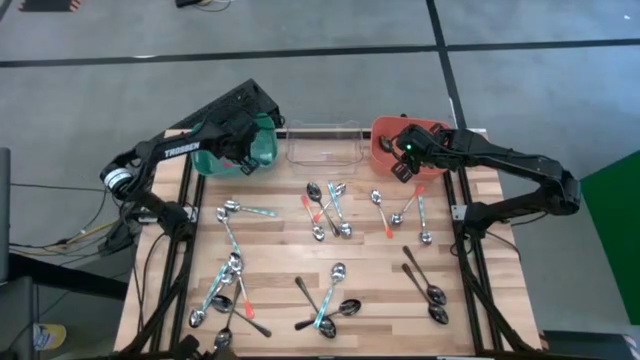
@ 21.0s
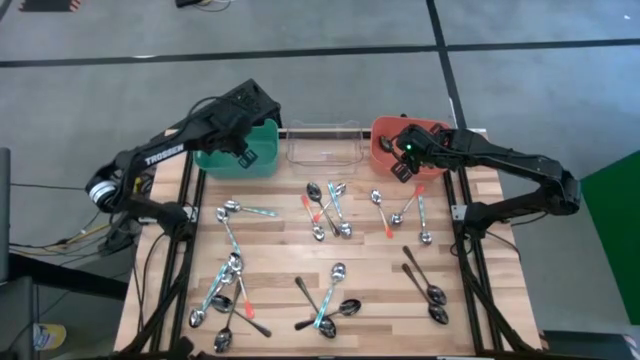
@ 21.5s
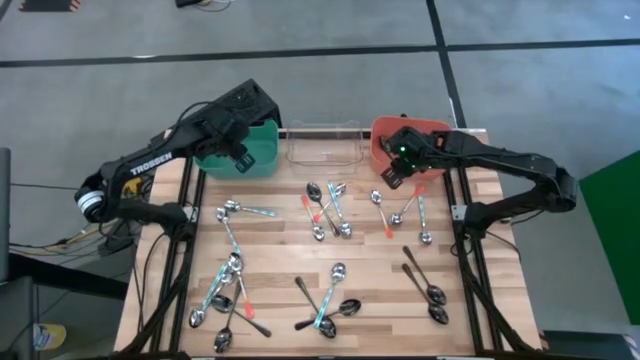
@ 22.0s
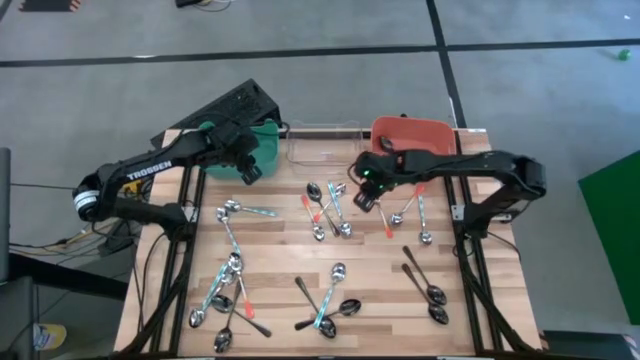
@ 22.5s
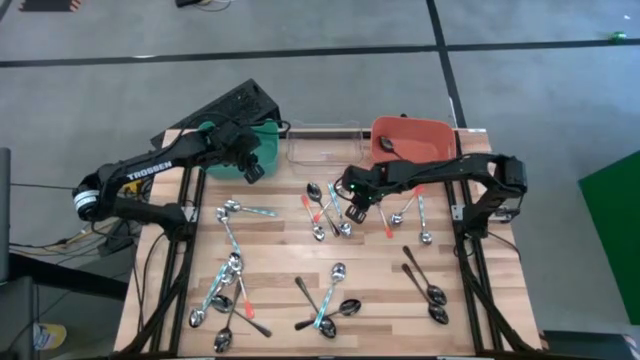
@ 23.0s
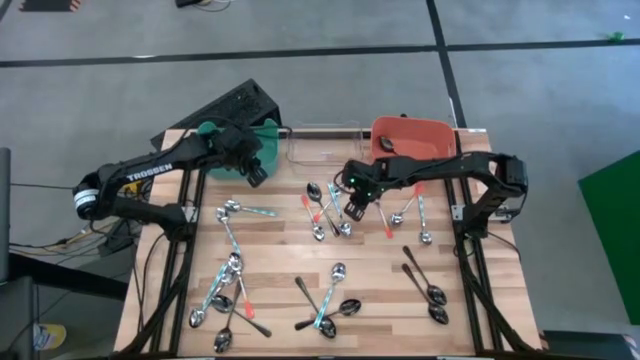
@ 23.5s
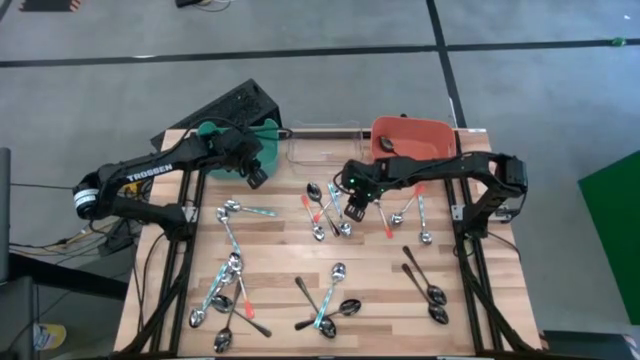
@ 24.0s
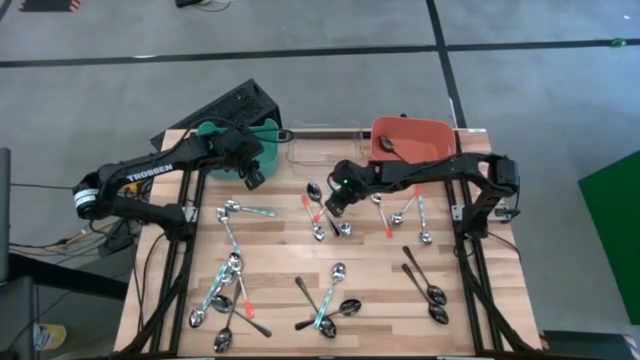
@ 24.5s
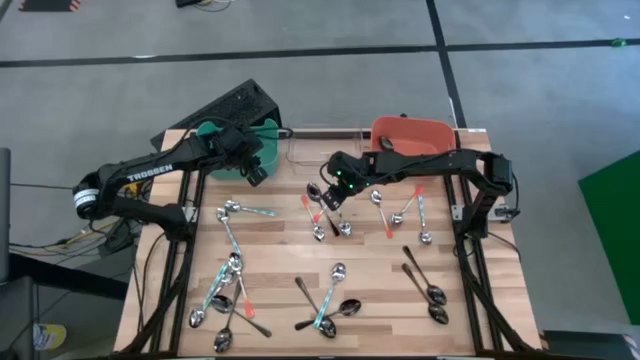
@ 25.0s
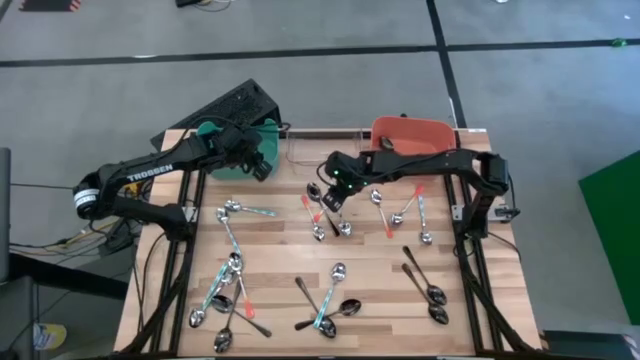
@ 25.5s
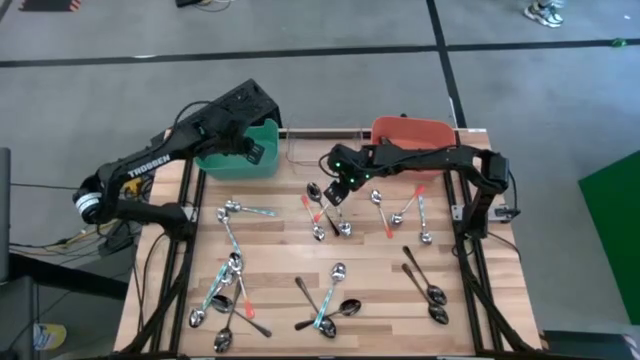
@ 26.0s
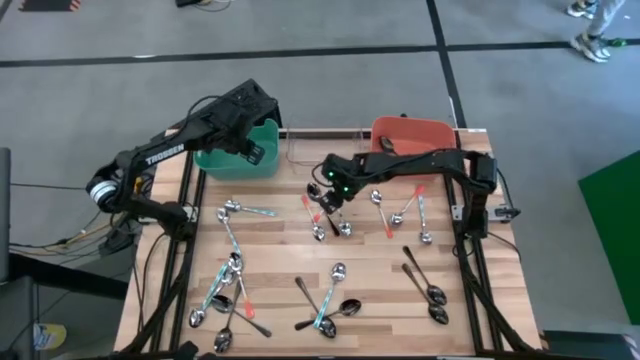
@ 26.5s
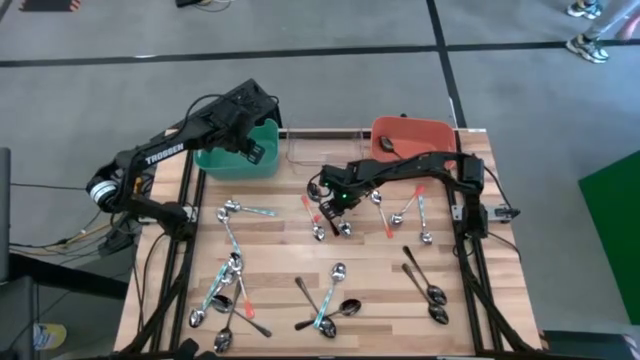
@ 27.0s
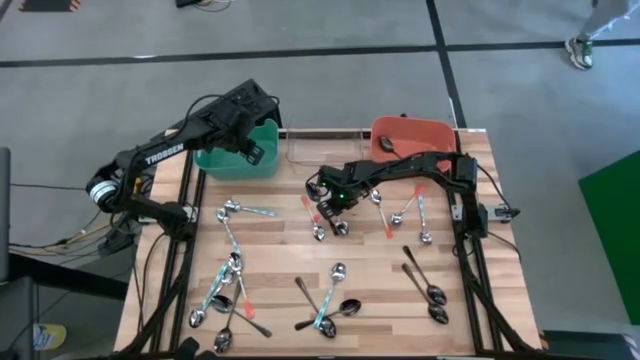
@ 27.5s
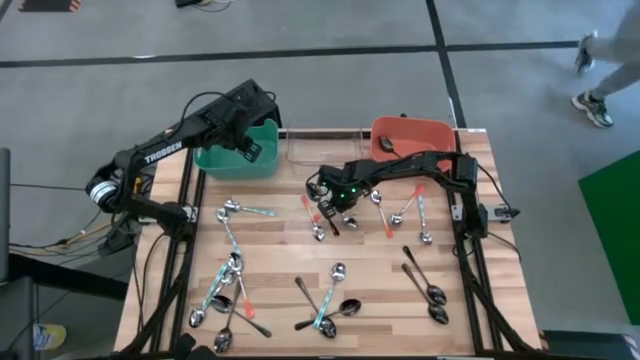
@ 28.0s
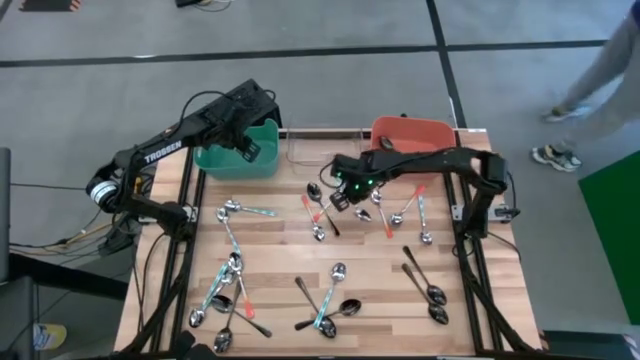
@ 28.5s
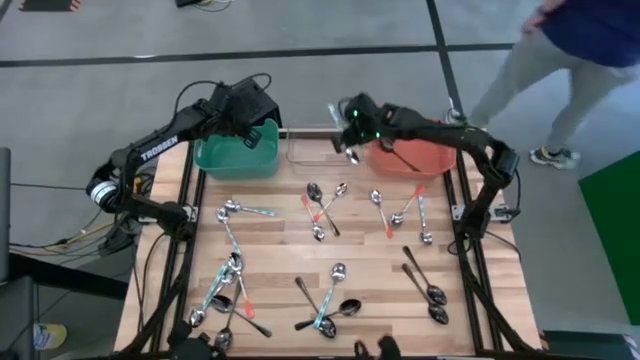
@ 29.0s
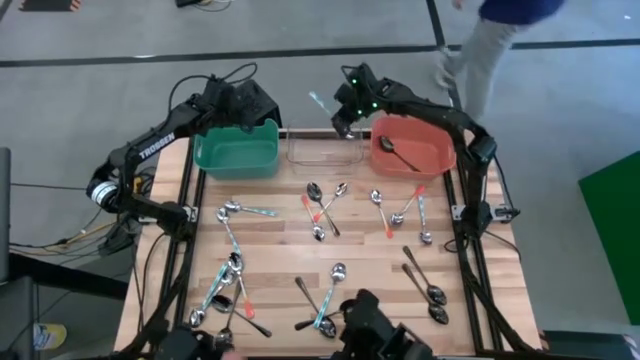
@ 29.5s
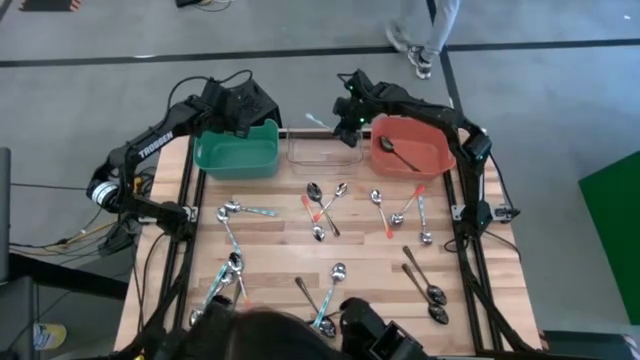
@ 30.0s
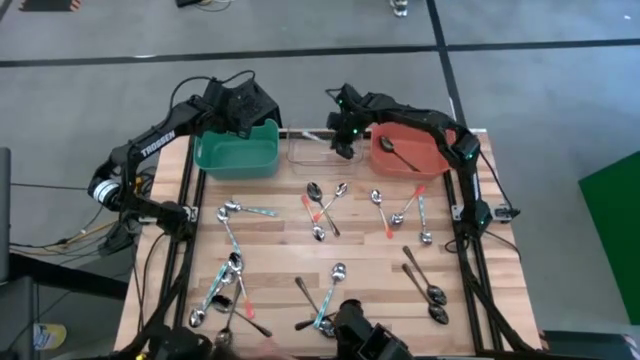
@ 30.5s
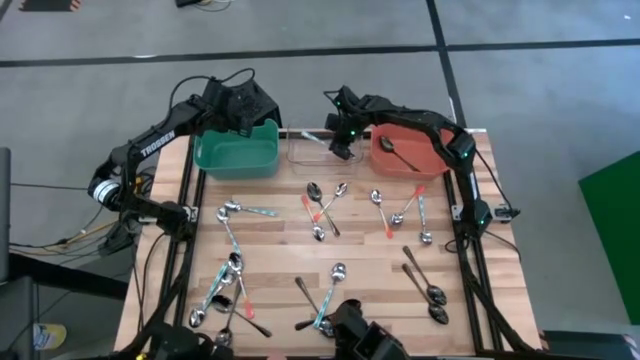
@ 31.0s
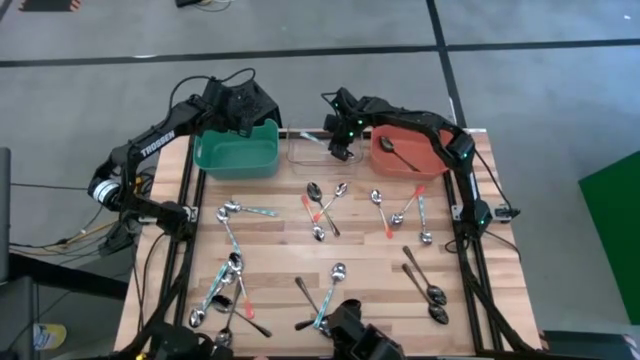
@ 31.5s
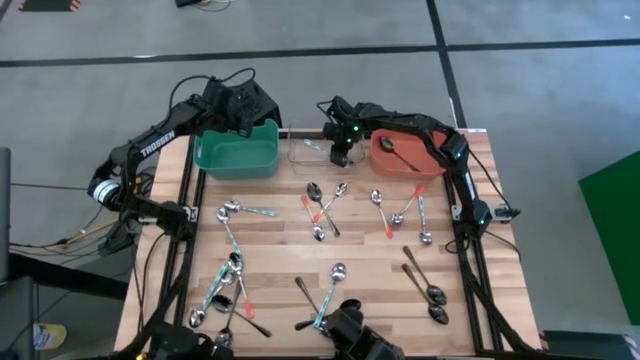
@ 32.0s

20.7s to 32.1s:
Task: Sort silverware by color (type)
Put the blue spoon into the transparent bin

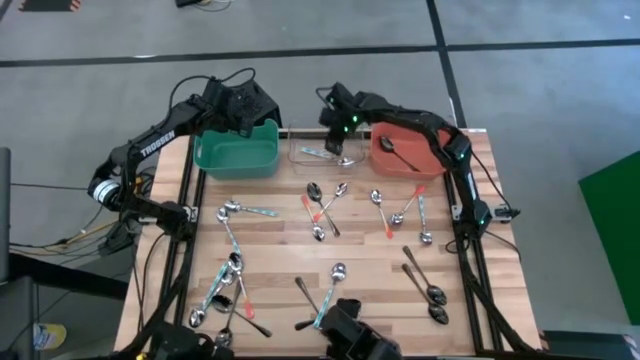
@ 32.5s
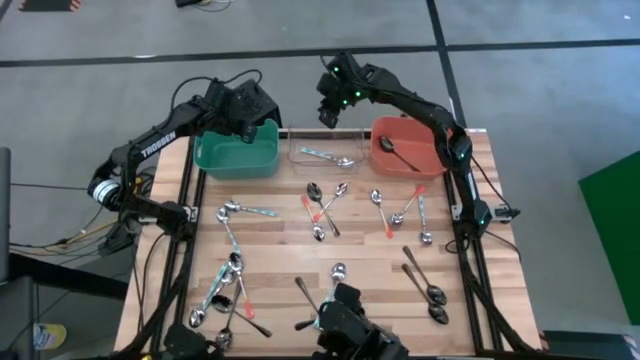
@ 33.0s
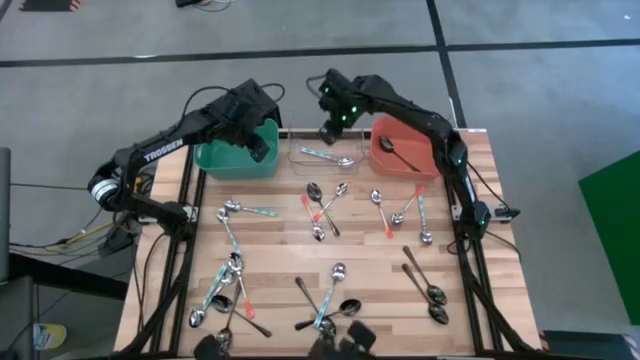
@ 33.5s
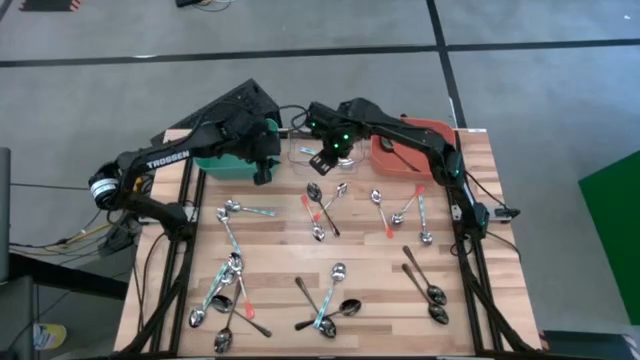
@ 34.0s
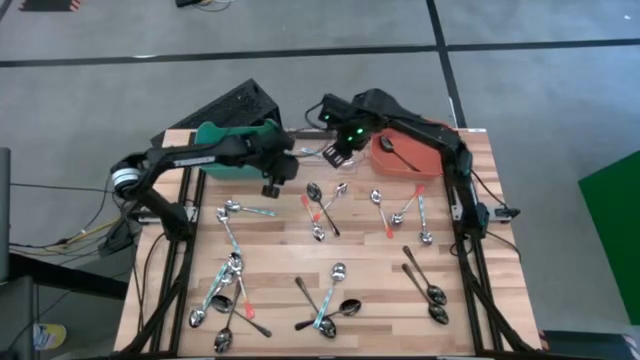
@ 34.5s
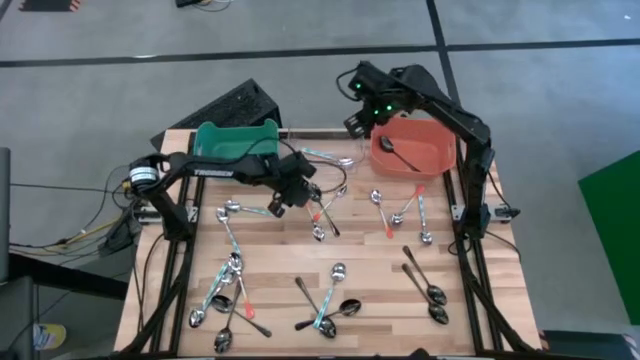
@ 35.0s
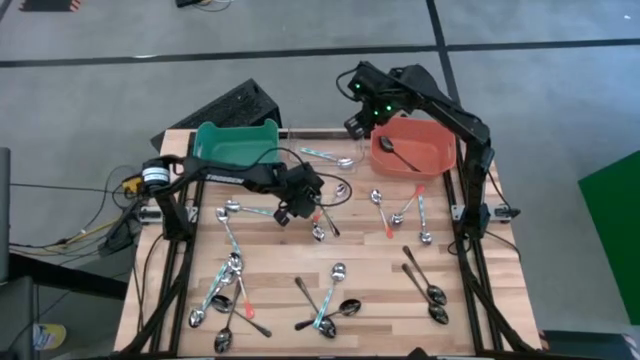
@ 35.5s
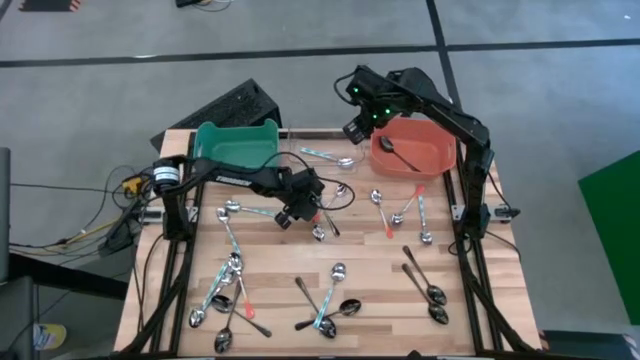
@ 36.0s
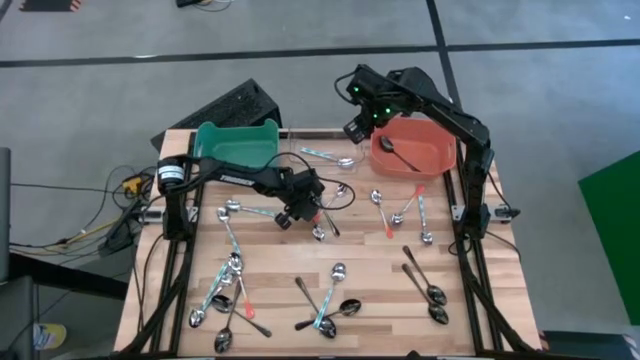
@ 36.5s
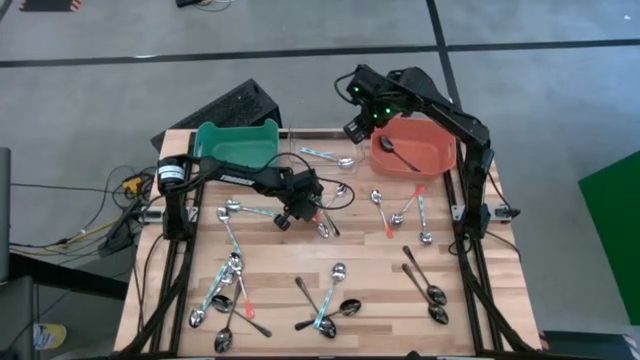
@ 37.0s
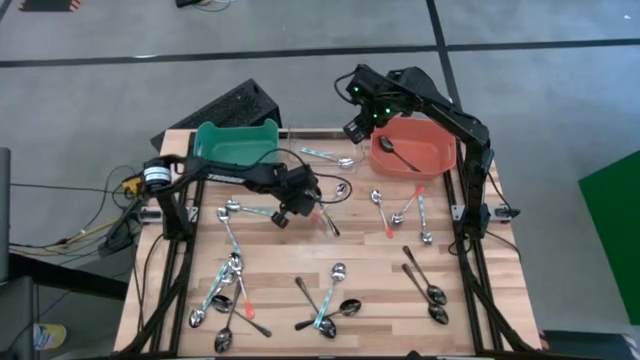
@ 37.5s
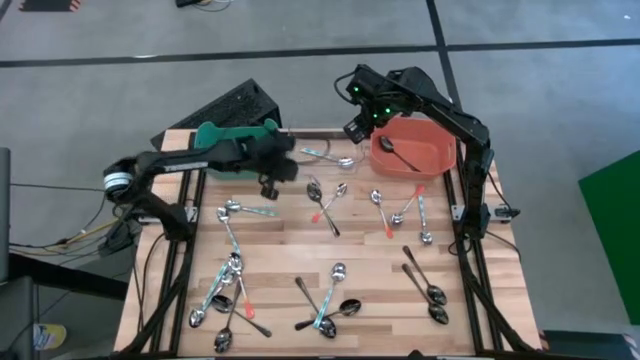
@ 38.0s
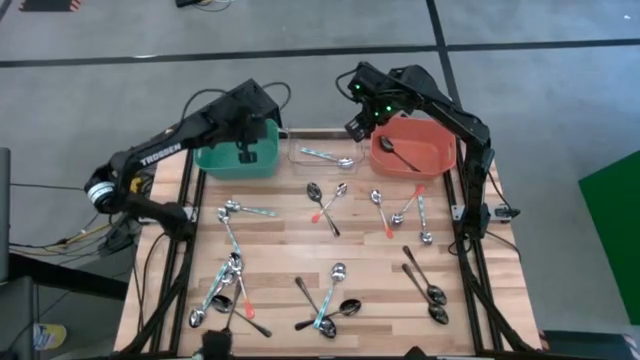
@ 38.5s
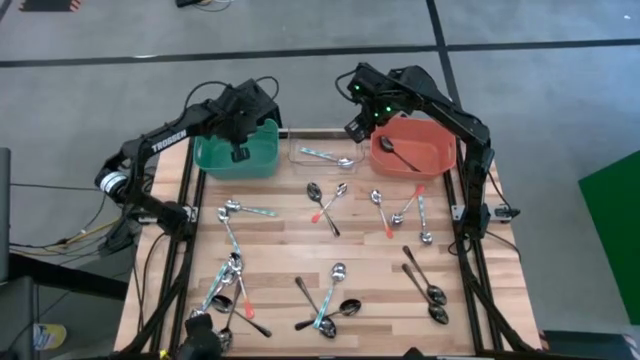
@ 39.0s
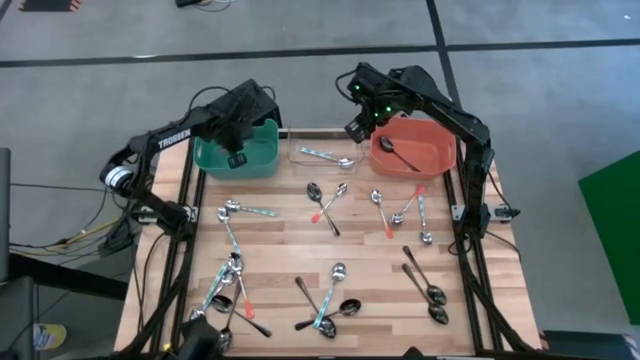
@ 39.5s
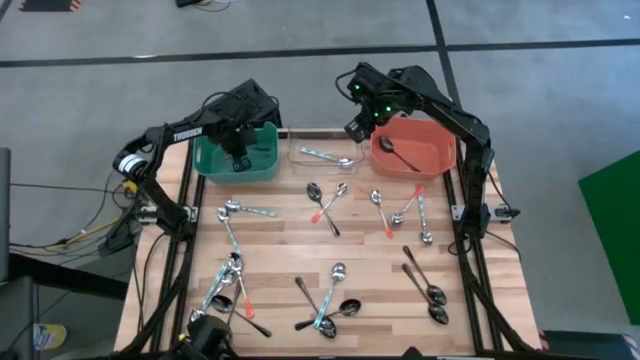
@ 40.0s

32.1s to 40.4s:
Put the orange spoon into the green bin

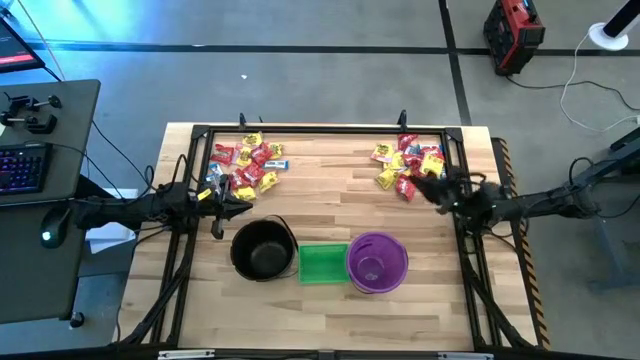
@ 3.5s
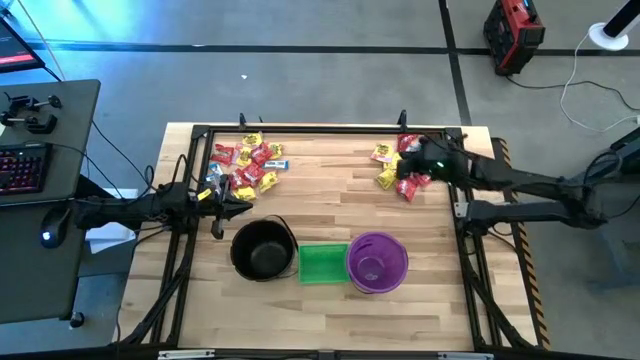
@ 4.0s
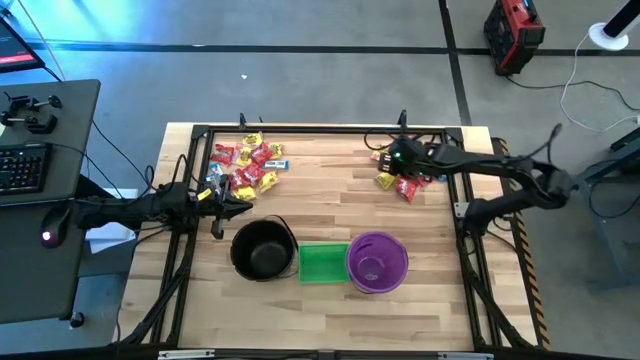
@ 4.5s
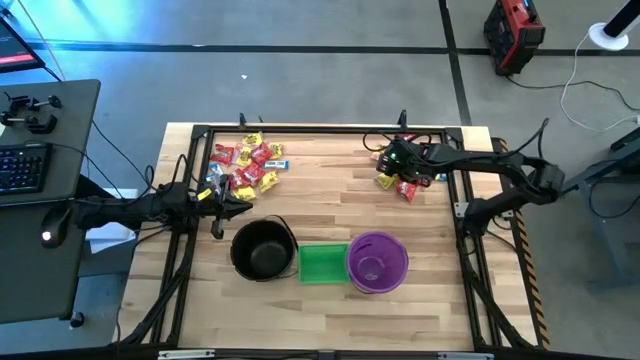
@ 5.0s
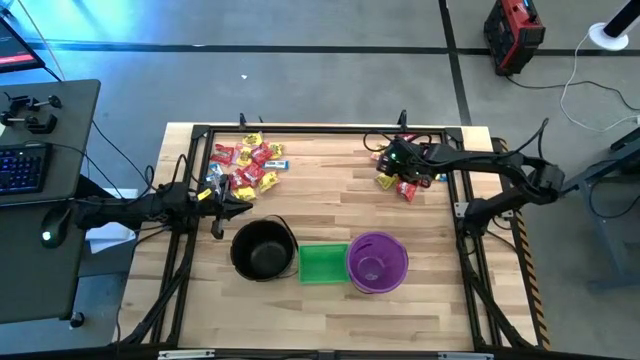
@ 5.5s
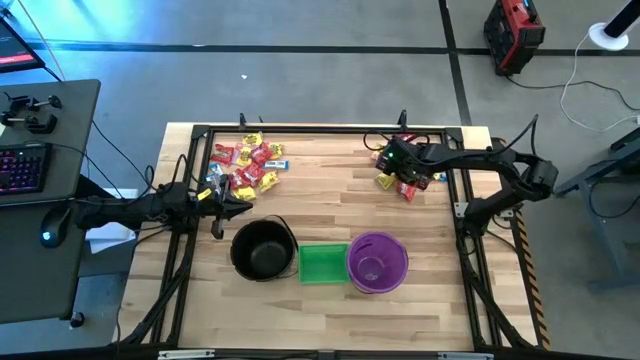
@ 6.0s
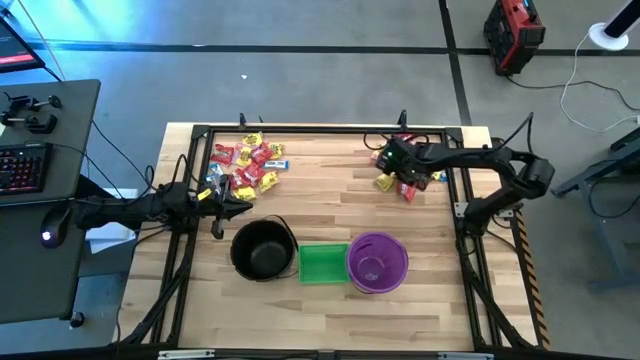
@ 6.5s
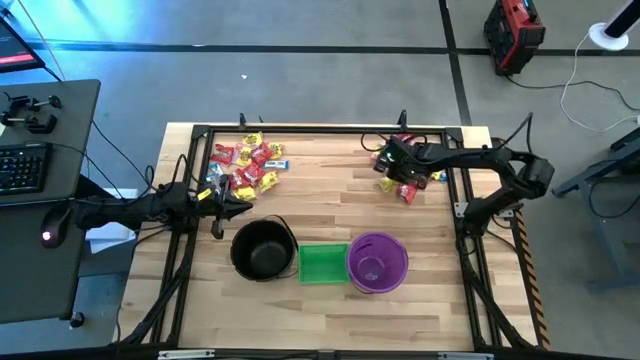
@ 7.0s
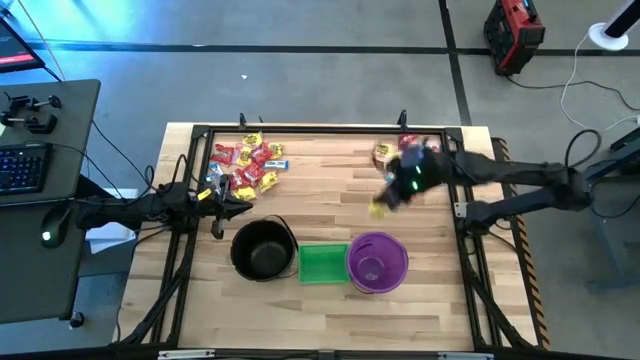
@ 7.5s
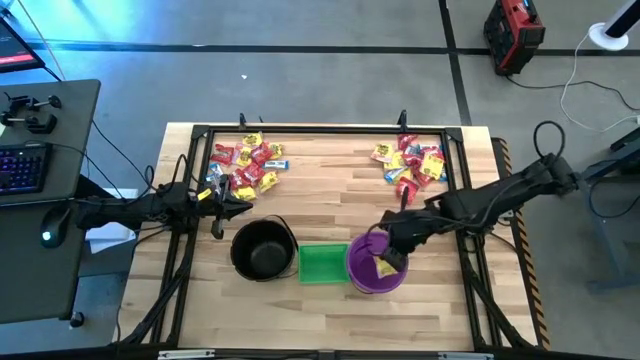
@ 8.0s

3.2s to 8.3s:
Task: Sort candy by brand, put in halloween buckets
Put the yellow candy into the violet bucket
